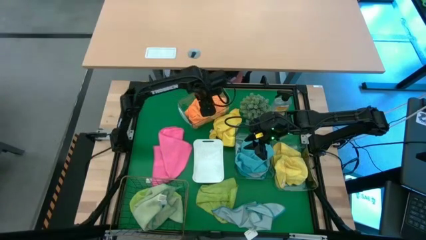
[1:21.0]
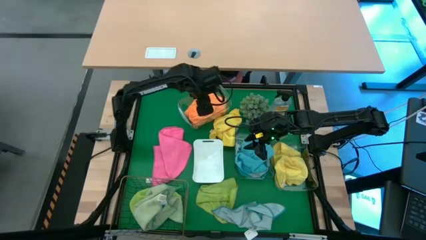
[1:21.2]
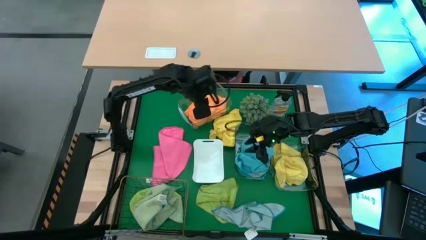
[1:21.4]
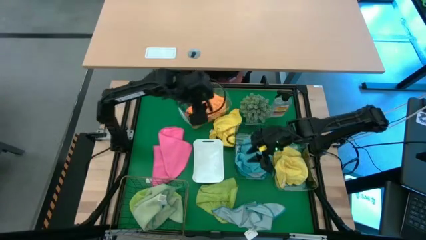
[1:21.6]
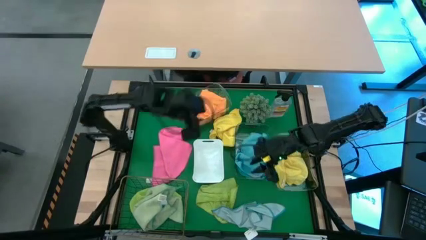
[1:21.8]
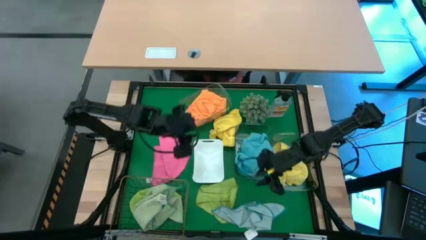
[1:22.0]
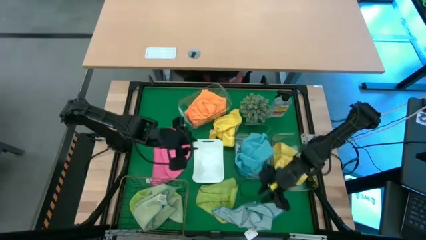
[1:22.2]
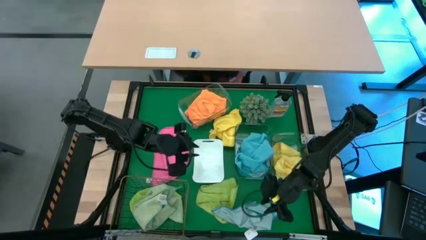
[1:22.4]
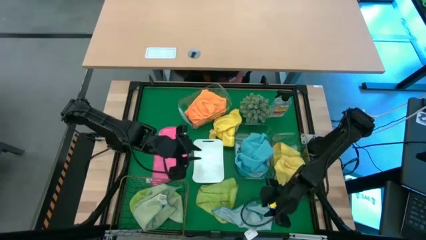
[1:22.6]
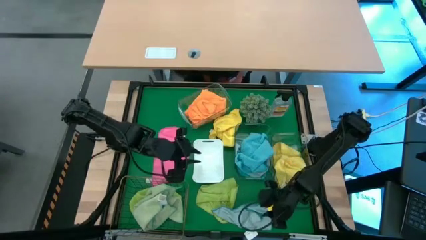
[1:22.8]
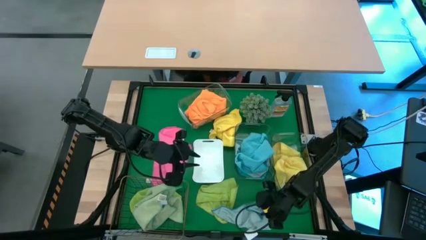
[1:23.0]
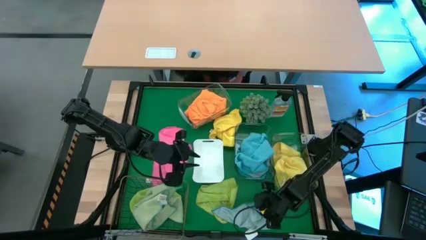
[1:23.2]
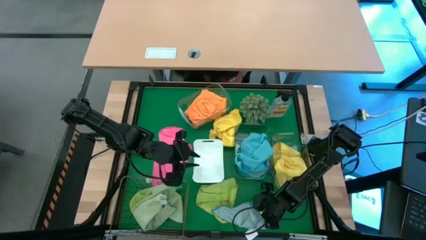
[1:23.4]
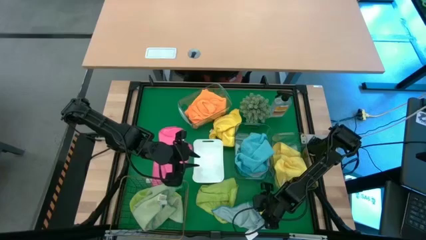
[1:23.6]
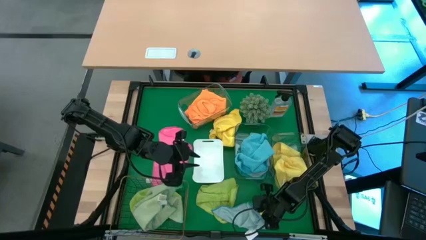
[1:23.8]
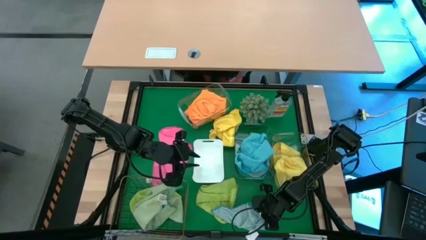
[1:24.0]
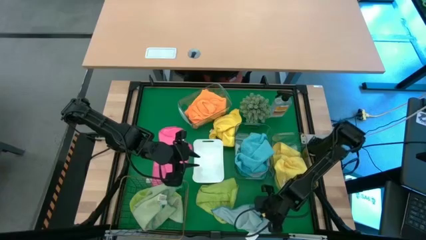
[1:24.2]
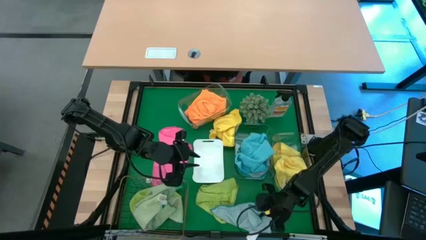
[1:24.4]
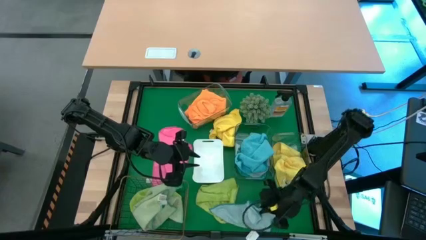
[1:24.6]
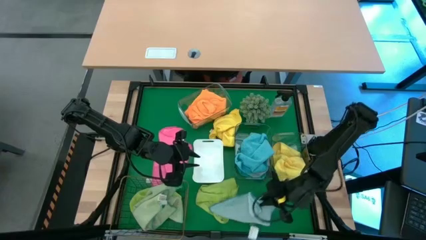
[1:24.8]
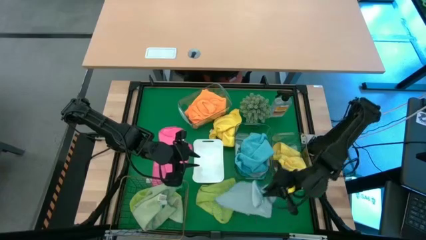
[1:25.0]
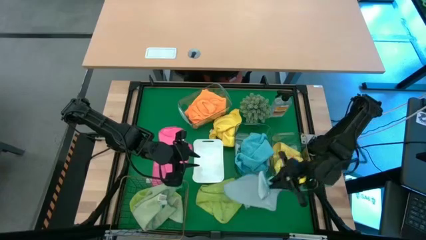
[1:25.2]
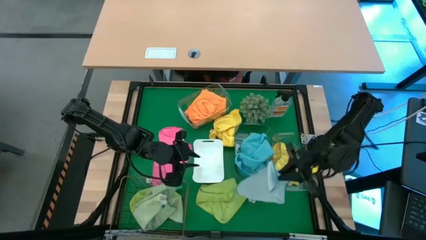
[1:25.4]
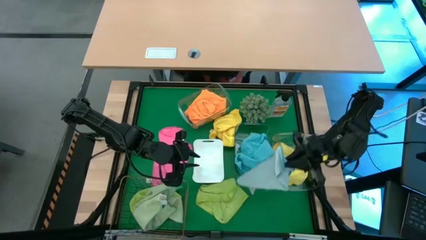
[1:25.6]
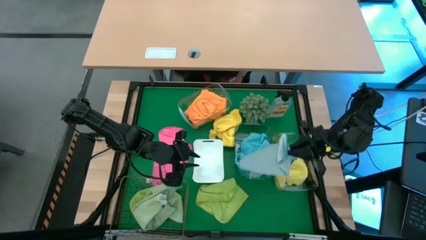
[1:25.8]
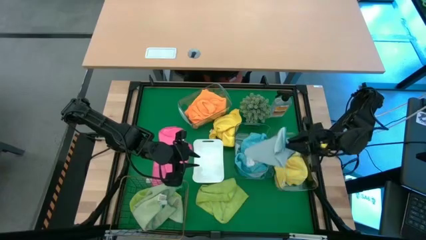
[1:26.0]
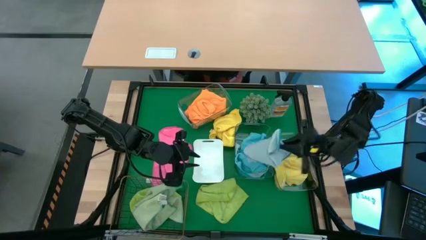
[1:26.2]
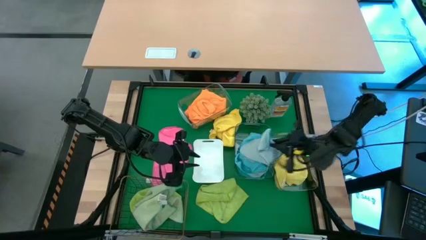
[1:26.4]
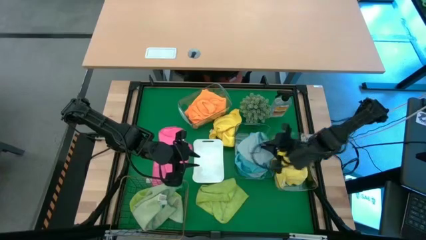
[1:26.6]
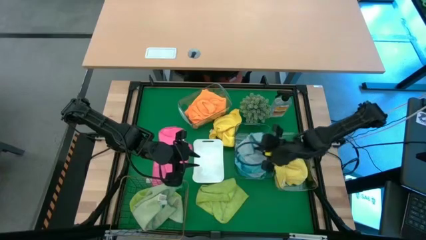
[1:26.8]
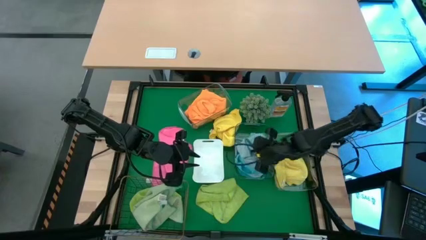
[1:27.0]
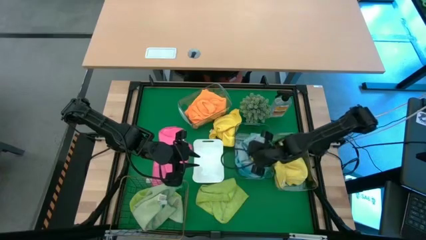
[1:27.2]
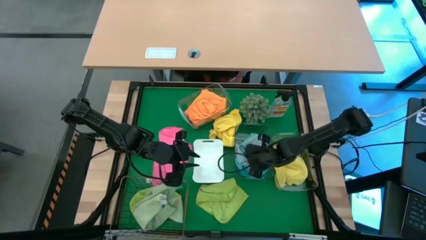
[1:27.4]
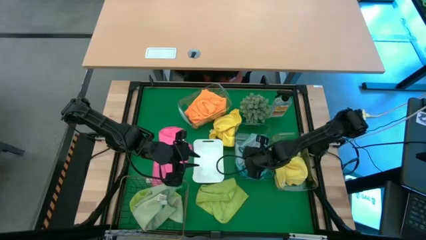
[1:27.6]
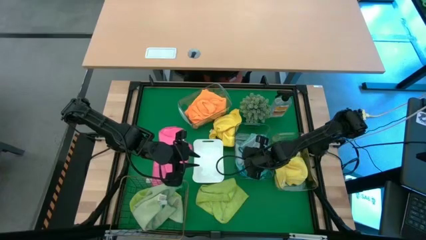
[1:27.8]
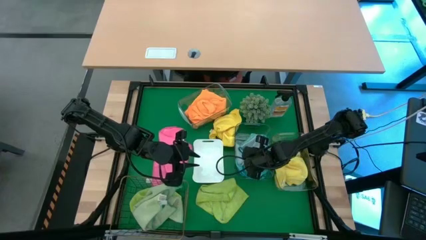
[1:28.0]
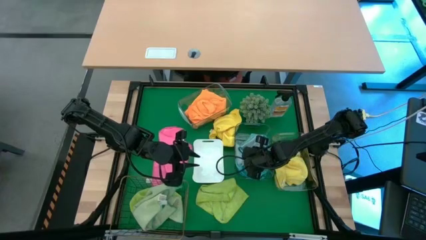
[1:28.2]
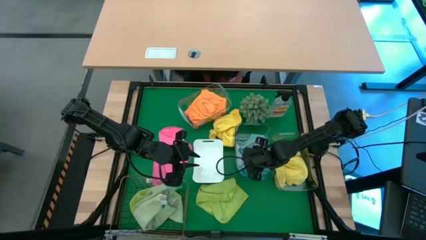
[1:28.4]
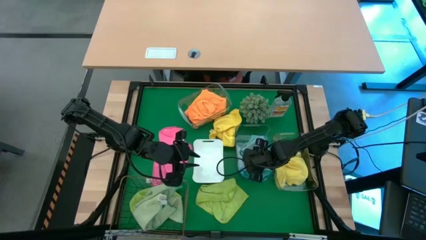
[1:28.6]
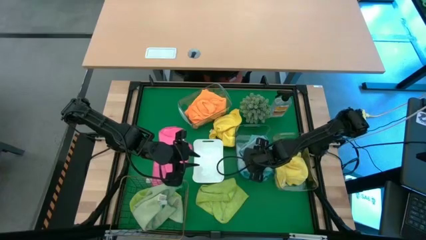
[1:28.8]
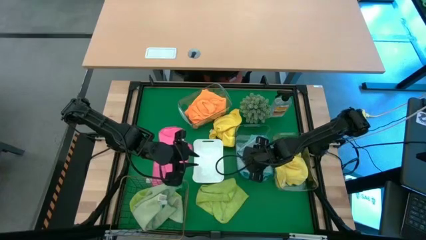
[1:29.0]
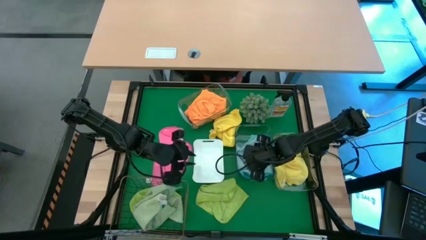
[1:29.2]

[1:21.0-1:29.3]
Task: Sort microfiber towel by color & place in baskets
Put the light blue microfiber towel into the middle transparent bin

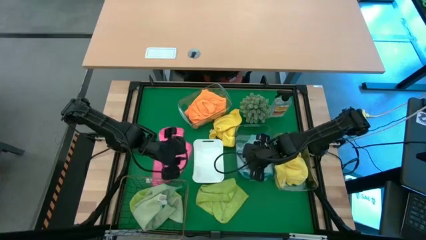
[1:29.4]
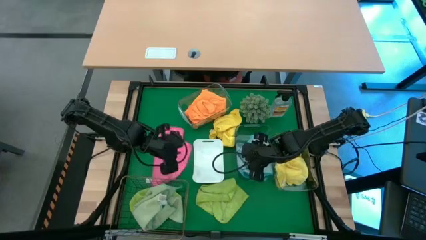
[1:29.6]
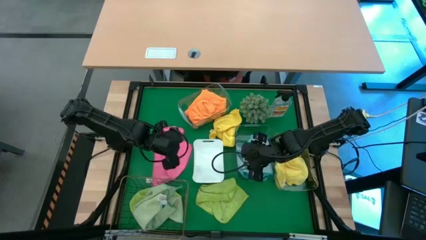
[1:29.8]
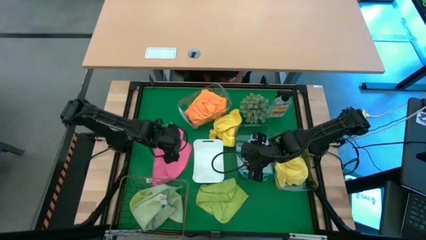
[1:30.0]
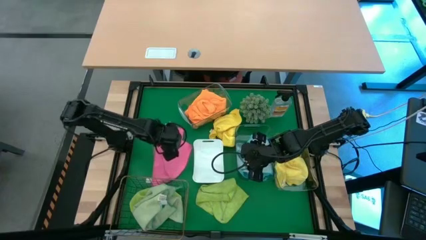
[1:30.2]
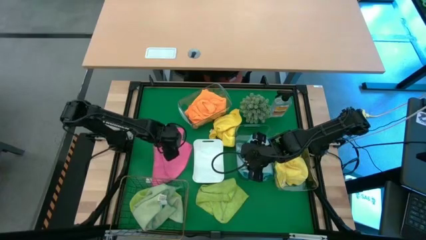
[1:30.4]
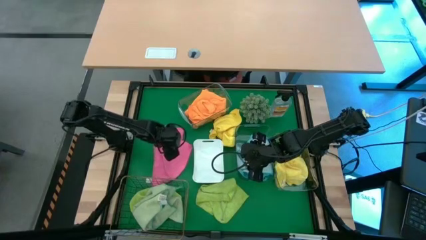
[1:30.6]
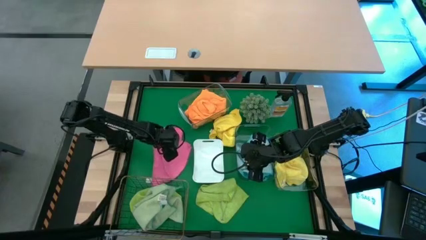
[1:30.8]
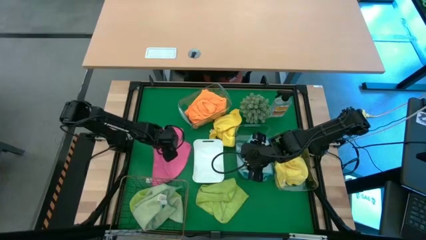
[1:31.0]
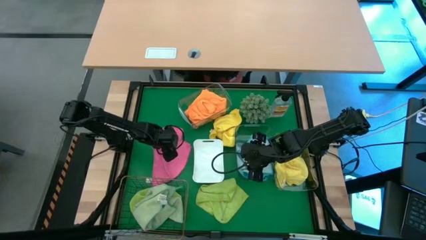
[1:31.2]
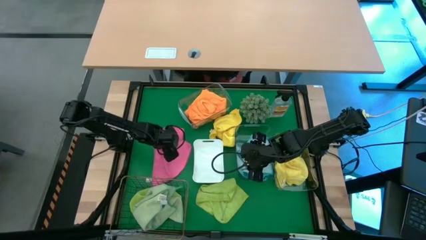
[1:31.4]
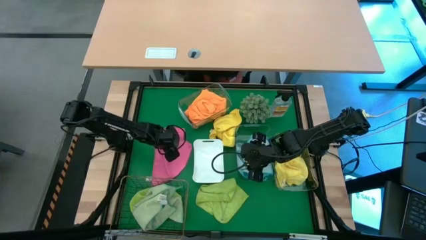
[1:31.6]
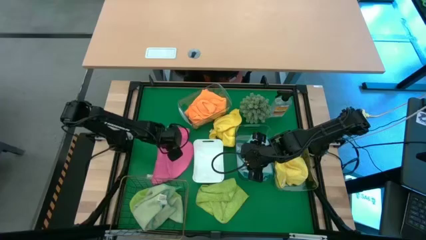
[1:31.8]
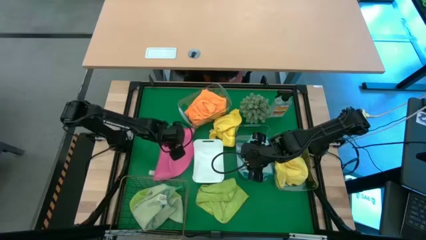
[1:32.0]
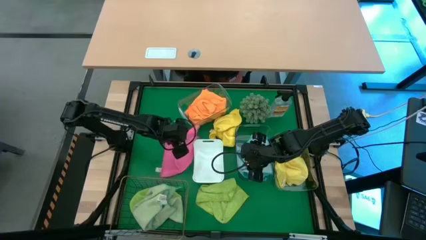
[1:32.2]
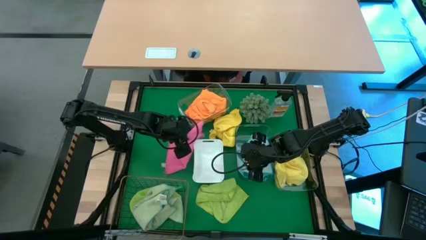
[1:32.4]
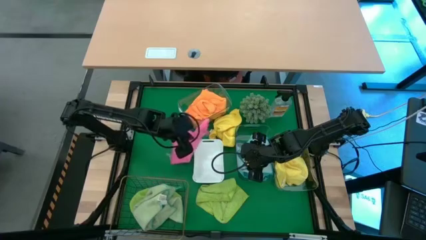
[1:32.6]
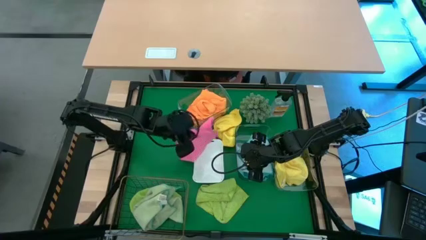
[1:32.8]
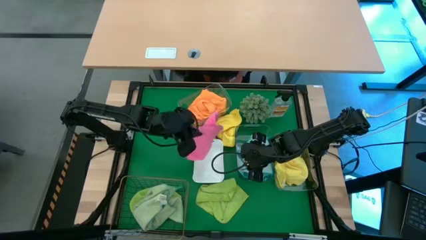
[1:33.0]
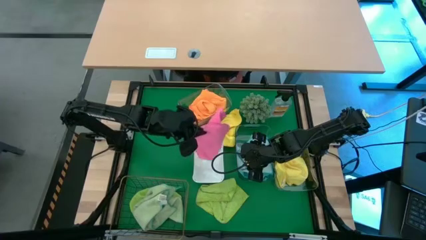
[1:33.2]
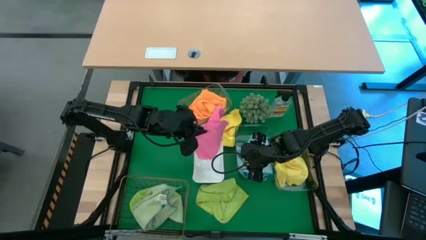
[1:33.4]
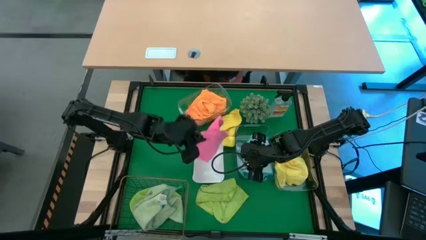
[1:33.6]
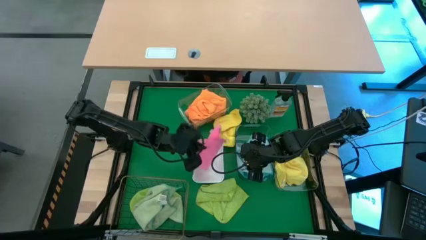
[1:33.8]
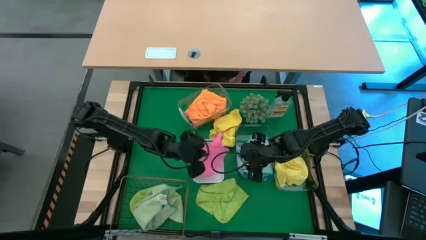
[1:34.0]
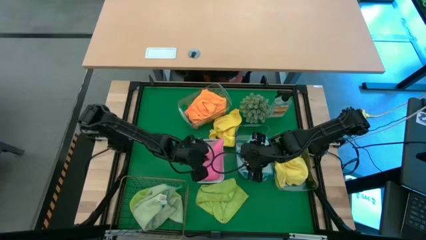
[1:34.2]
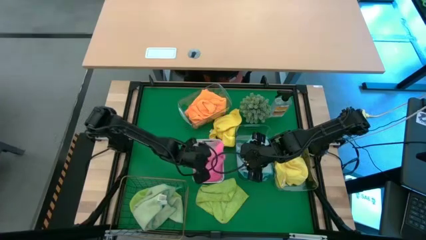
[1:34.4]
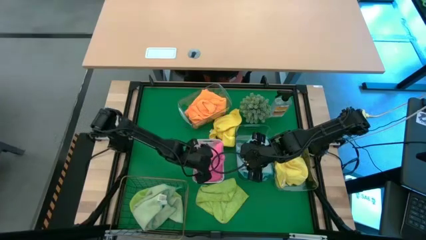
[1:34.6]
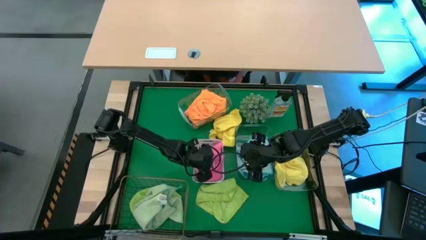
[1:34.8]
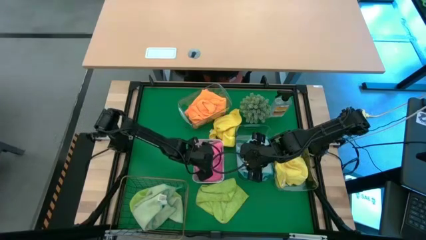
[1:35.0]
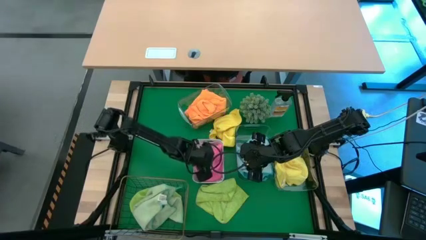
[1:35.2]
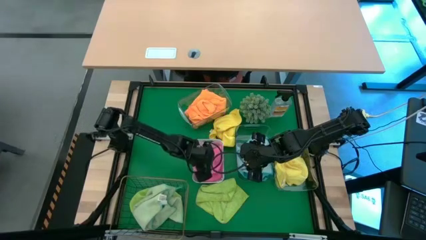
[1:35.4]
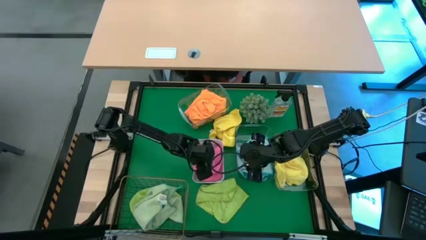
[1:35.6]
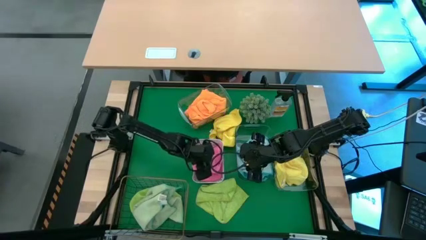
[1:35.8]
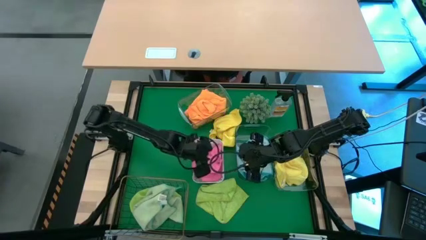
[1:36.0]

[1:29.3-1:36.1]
Put the pink microfiber towel into the white bin
